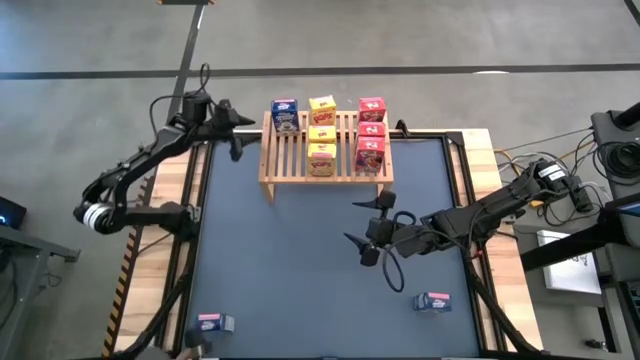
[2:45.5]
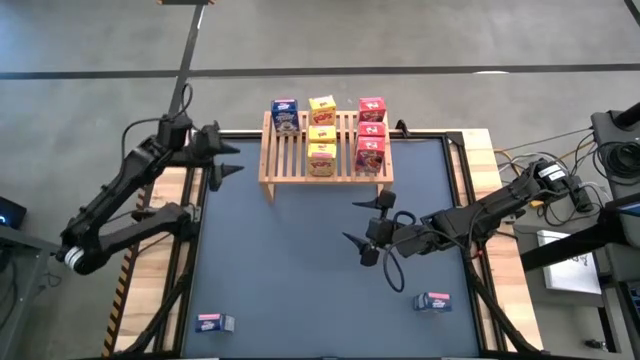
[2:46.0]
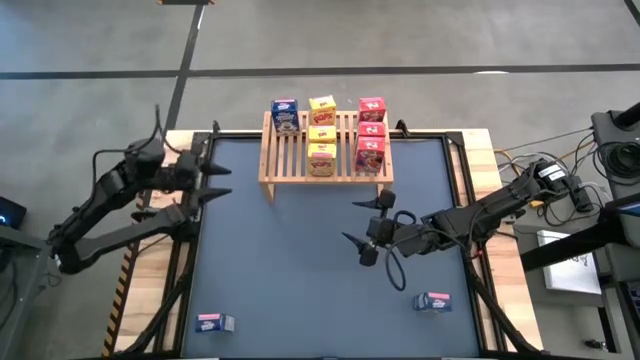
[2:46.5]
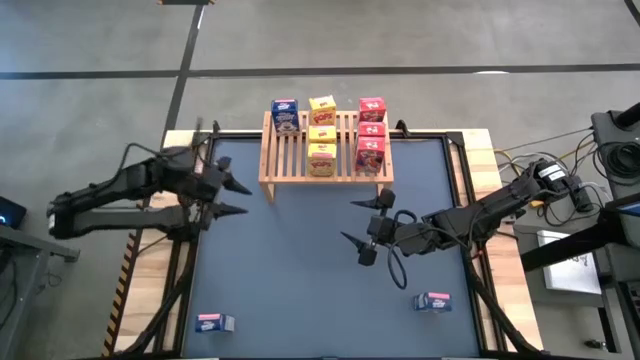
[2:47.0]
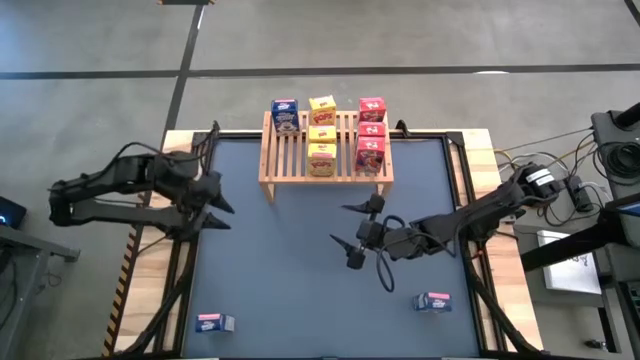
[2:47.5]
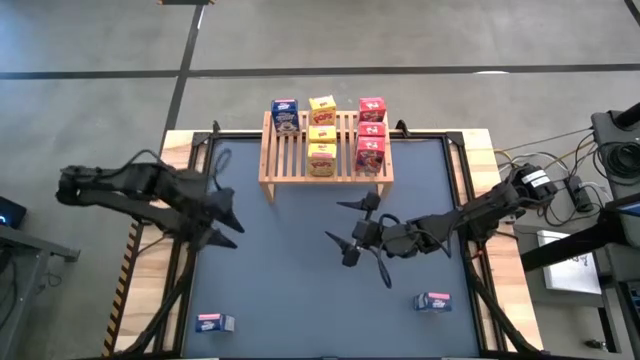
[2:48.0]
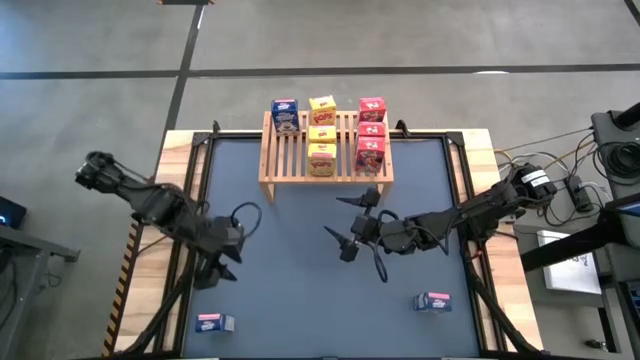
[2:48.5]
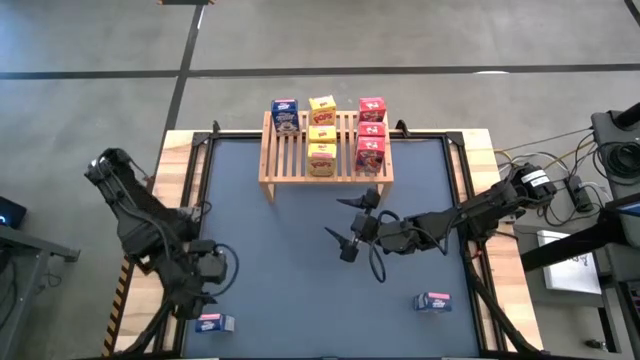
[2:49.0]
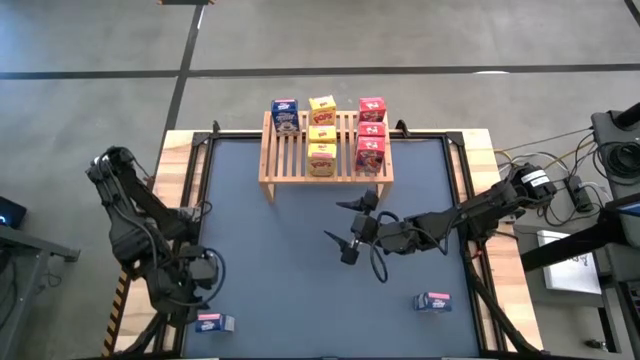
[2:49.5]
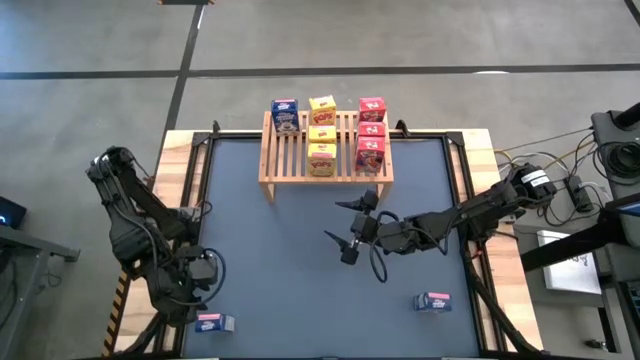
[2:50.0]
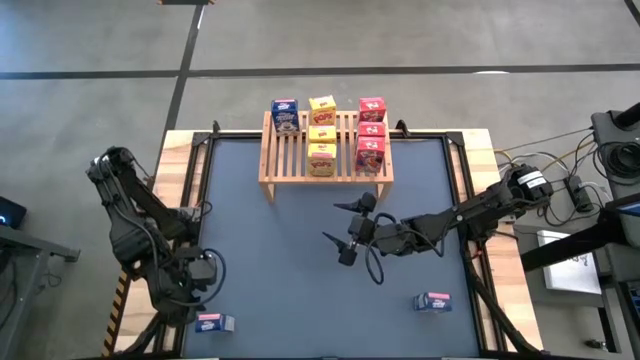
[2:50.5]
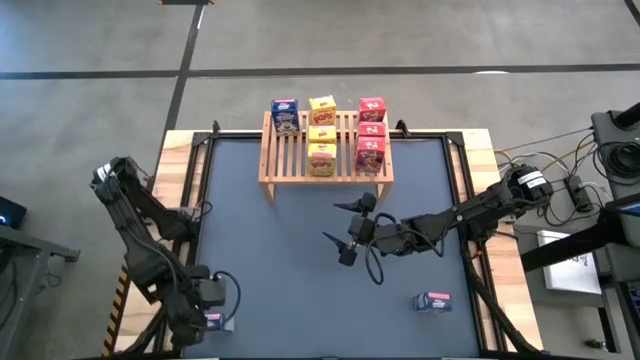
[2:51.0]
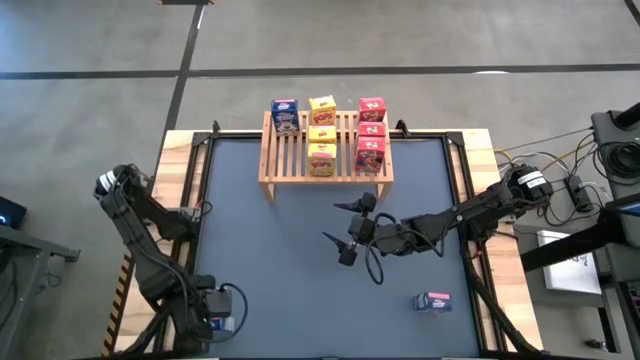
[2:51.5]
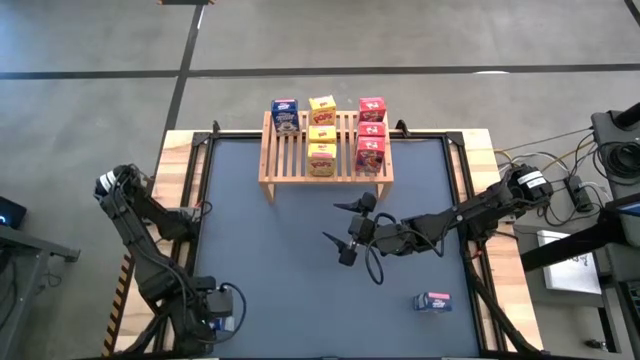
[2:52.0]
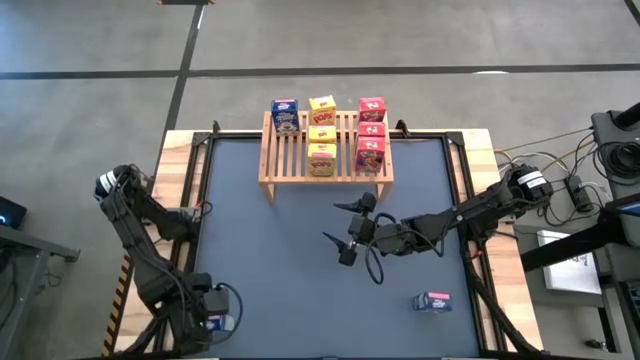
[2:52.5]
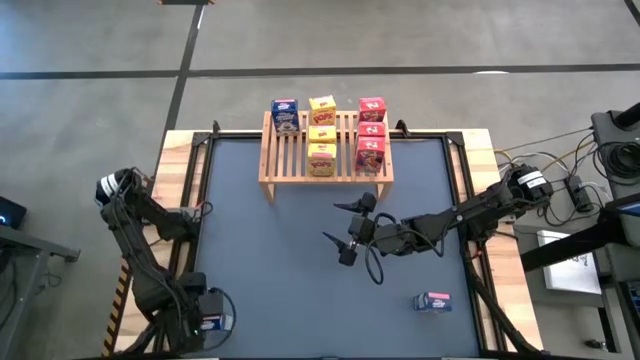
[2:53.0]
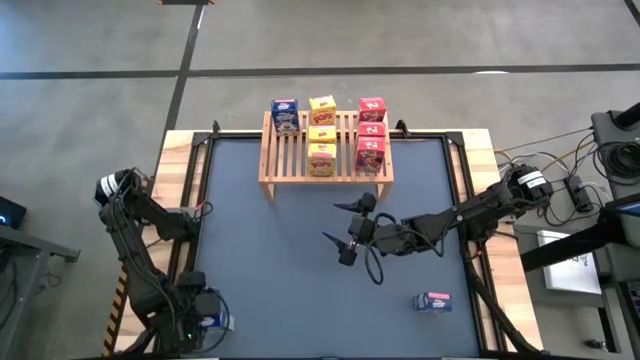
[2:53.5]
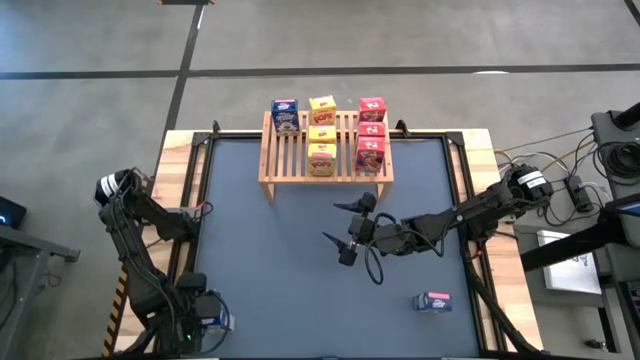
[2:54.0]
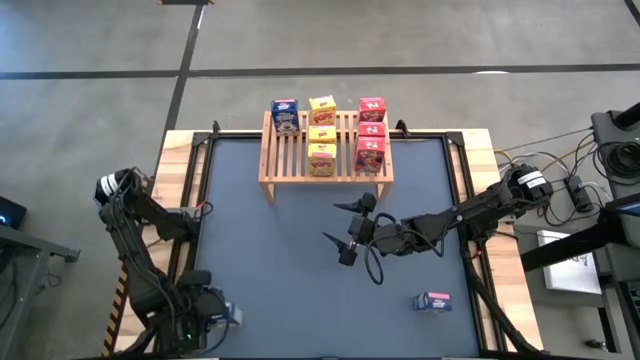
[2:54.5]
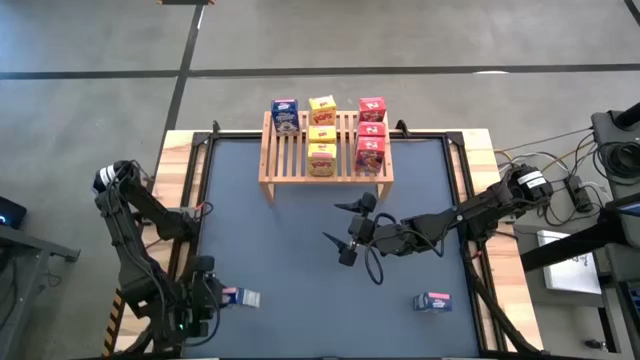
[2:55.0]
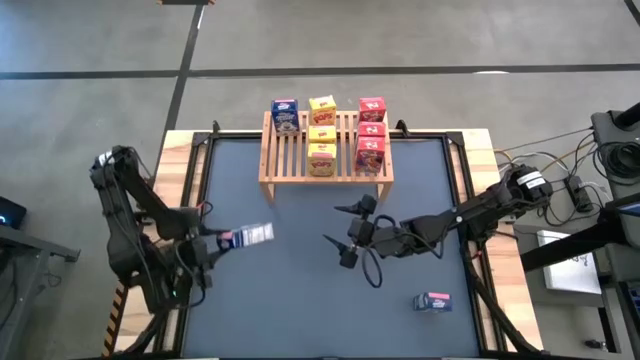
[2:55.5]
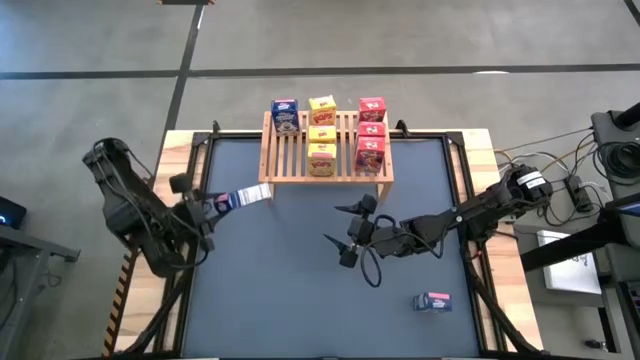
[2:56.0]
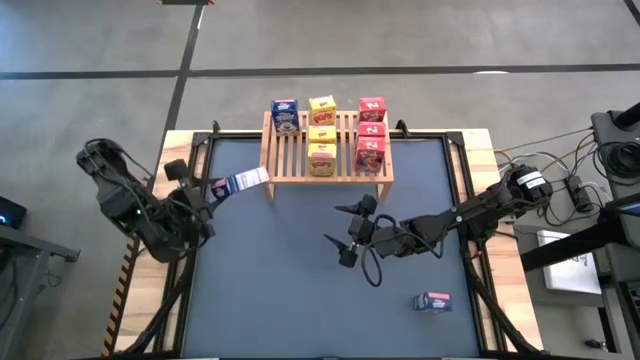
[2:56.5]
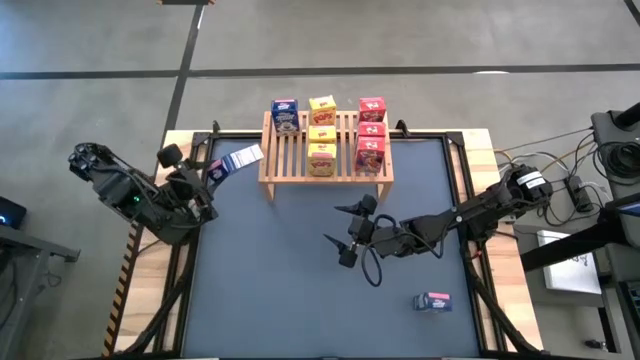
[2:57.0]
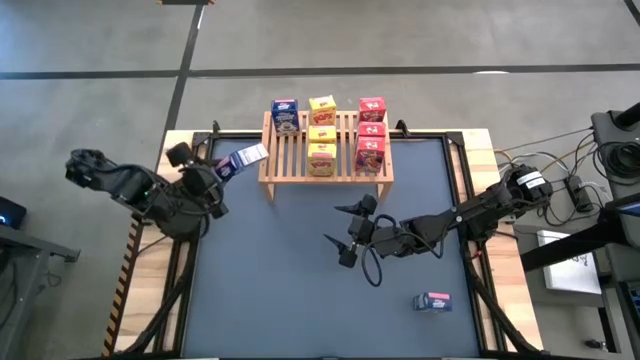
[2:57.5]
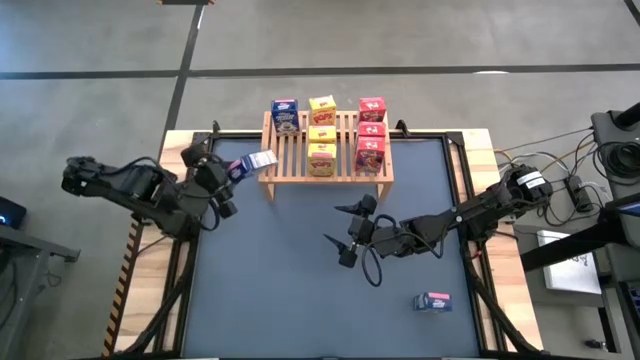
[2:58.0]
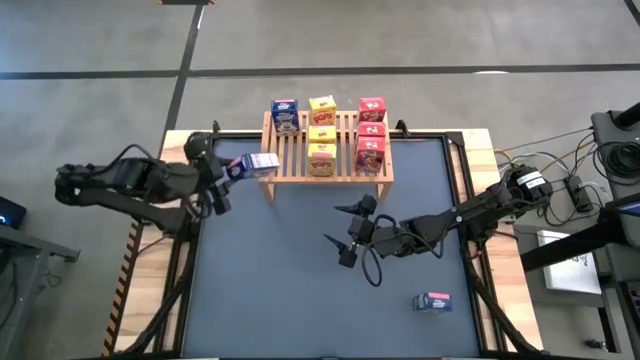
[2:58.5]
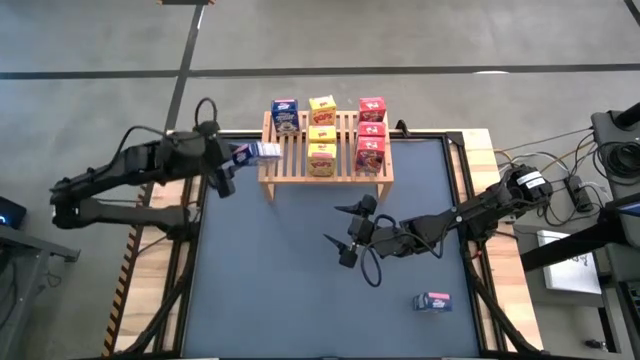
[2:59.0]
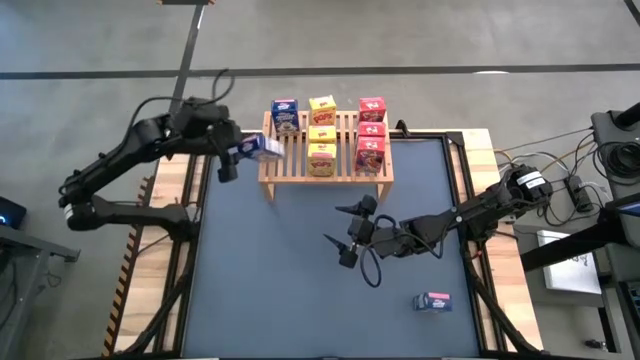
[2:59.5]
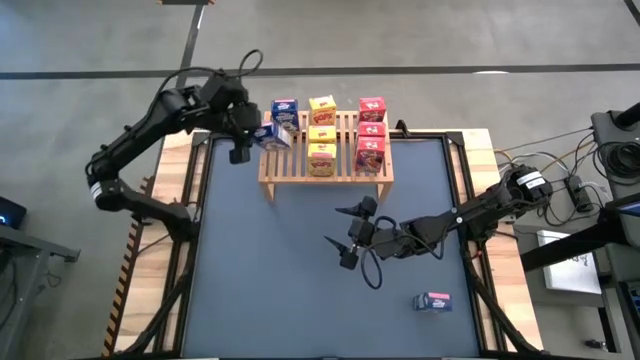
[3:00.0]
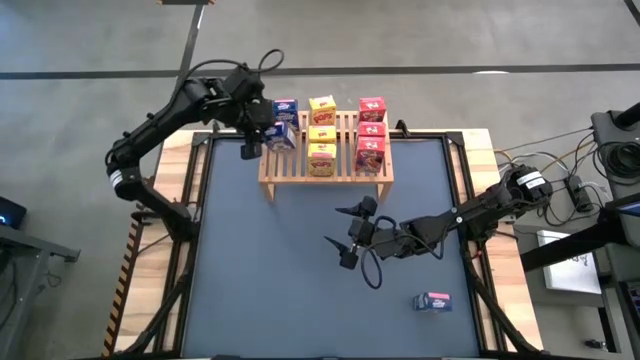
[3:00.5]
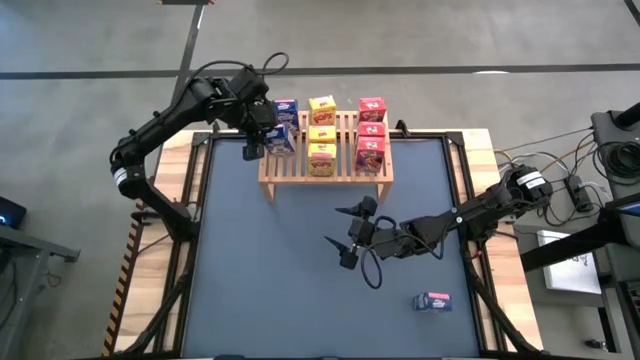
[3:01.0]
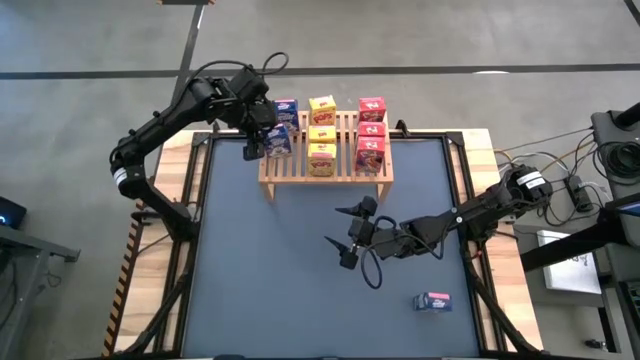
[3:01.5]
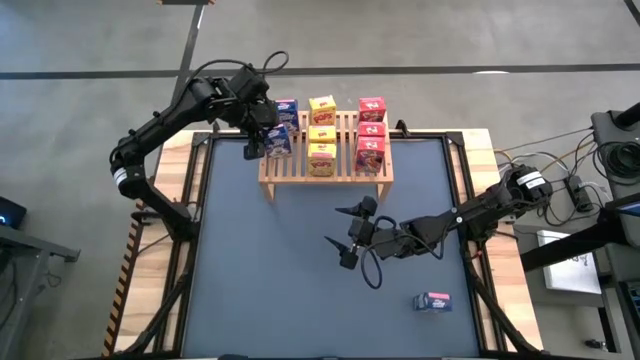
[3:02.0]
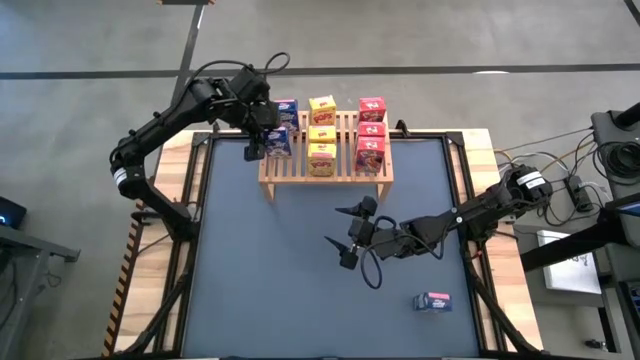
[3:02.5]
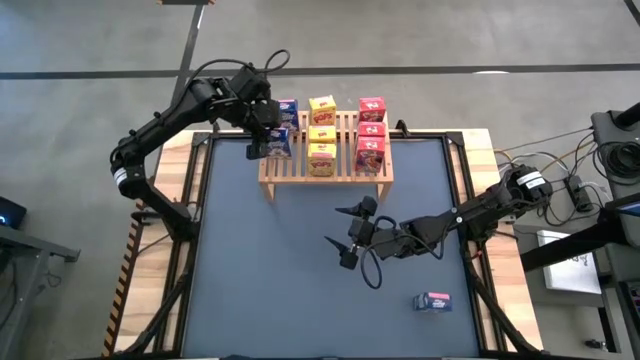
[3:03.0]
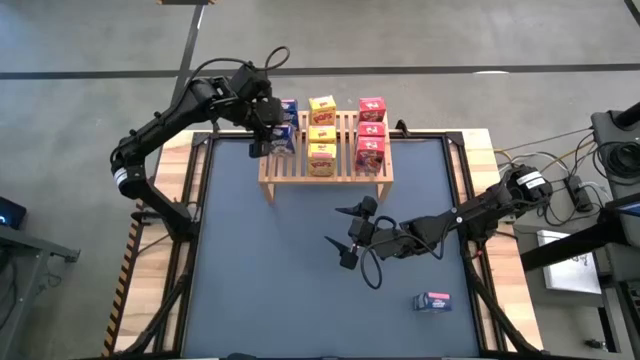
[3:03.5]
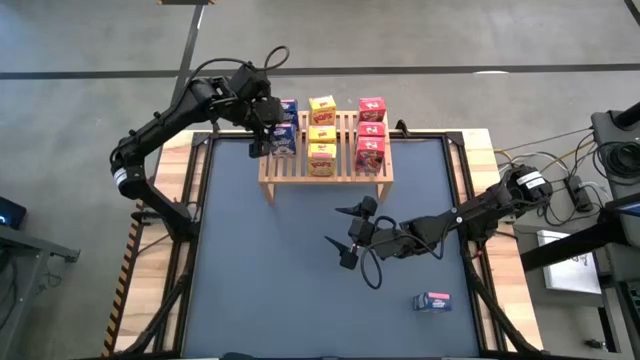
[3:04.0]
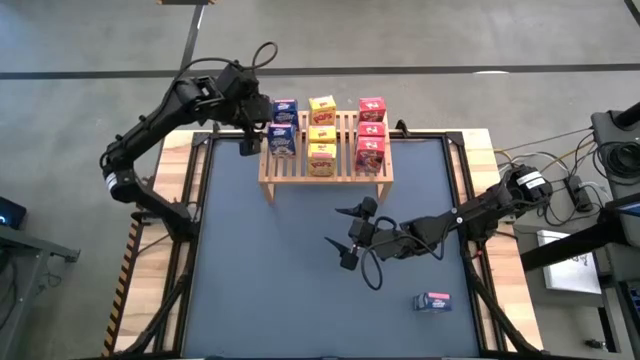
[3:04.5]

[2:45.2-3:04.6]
Task: Stack cereal on shelf
Put the left blue cereal box on the shelf aligned with the blue cereal box

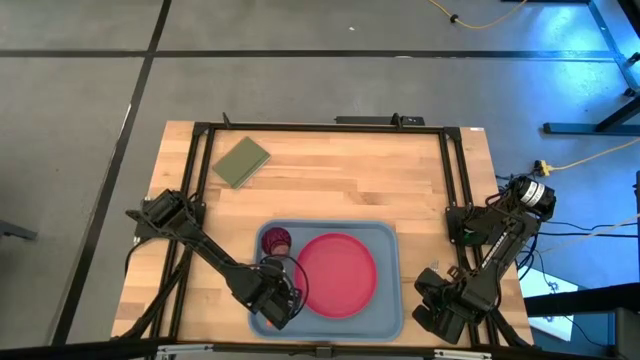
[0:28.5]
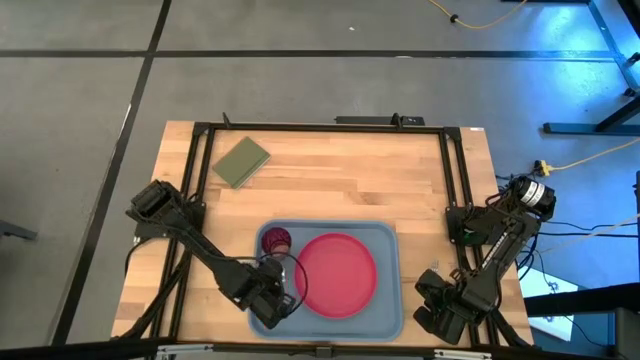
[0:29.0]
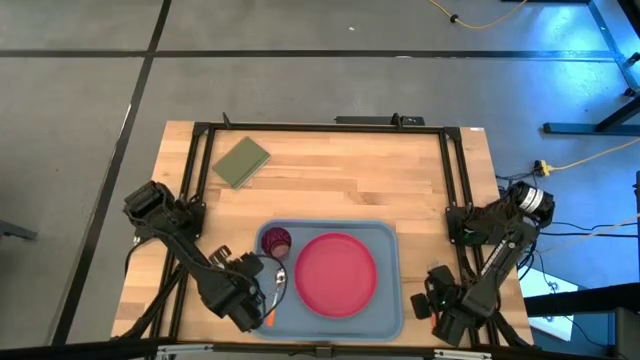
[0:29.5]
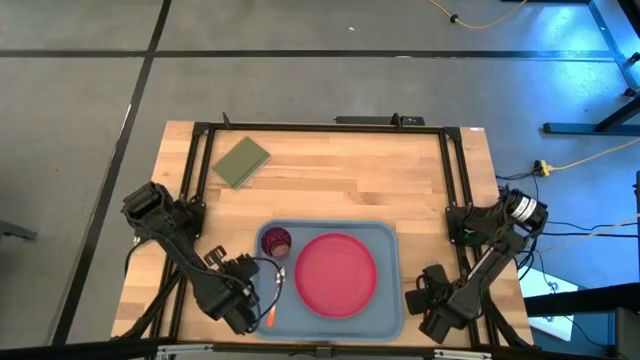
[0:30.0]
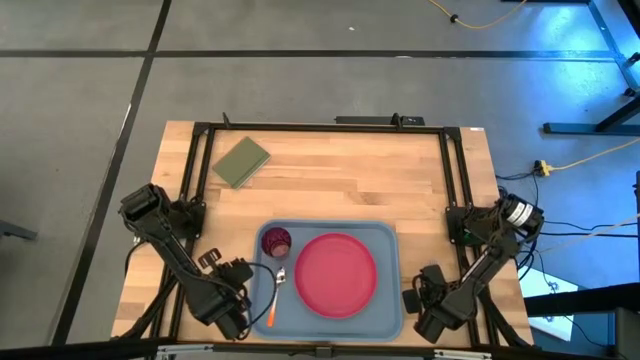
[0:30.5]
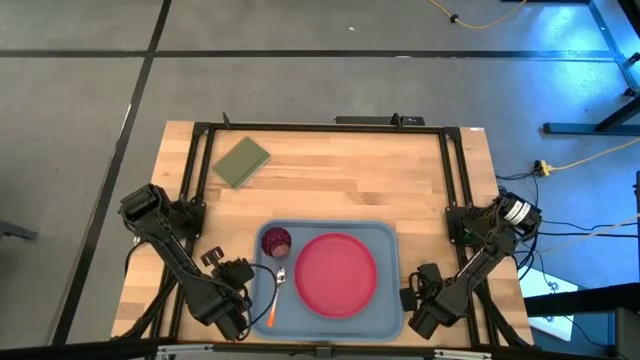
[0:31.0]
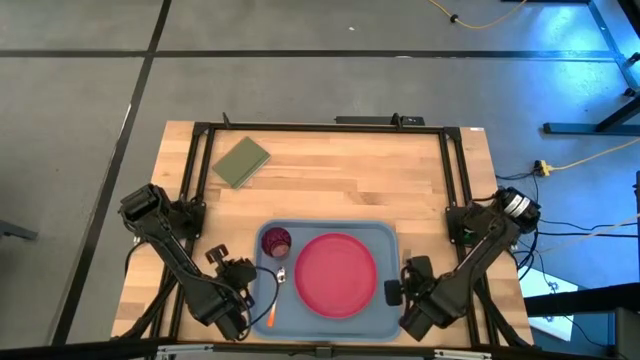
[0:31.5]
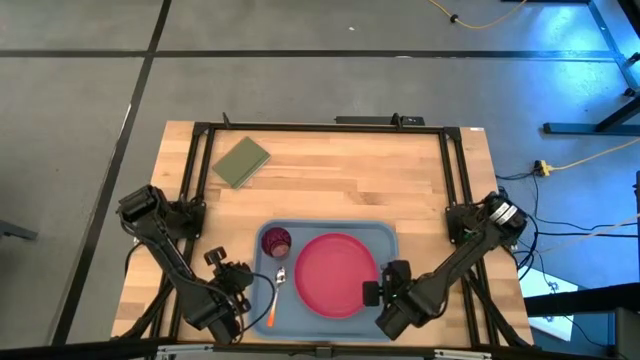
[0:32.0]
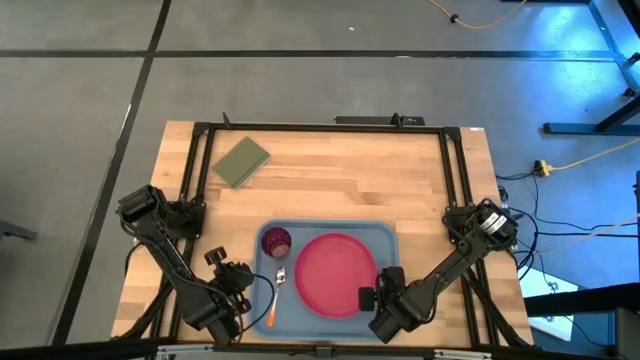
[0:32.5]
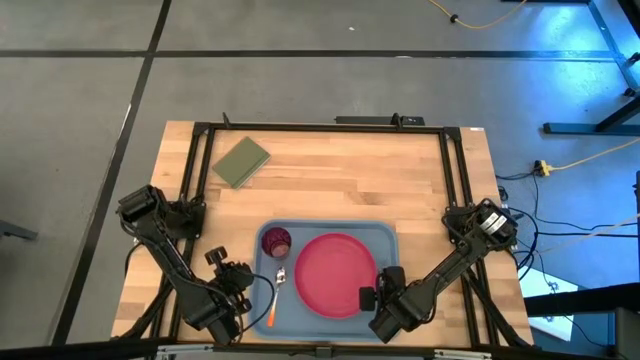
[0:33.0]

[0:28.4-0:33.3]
Task: Pick and place plate/cup/fork/spoon on tray
Put the orange fork on the blue serving tray to the right of the red plate
